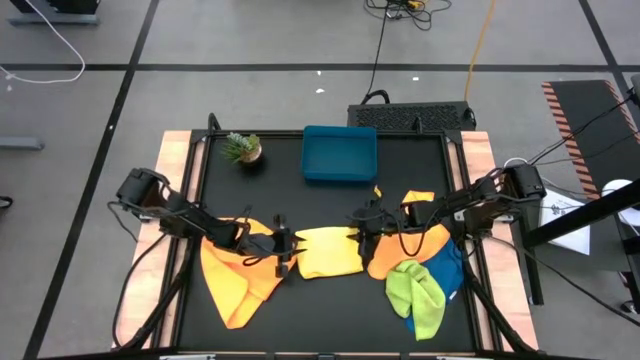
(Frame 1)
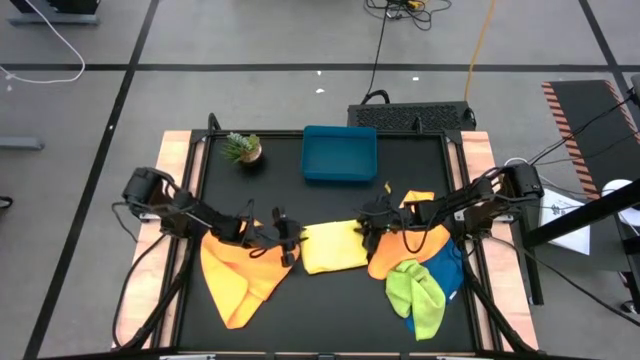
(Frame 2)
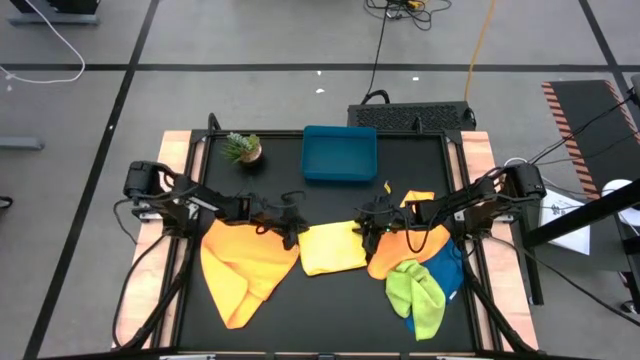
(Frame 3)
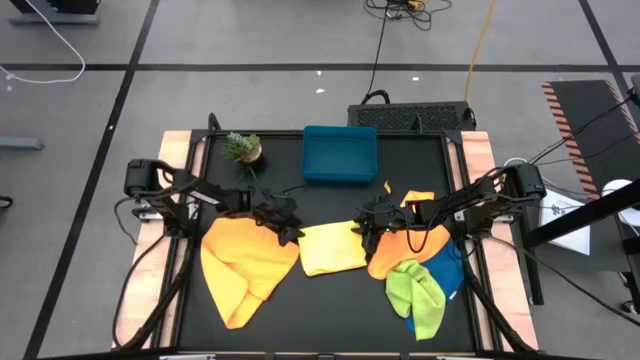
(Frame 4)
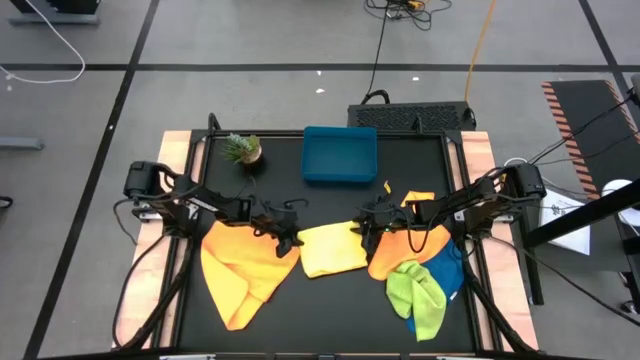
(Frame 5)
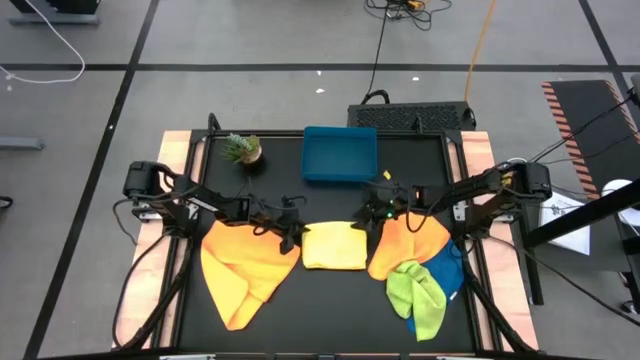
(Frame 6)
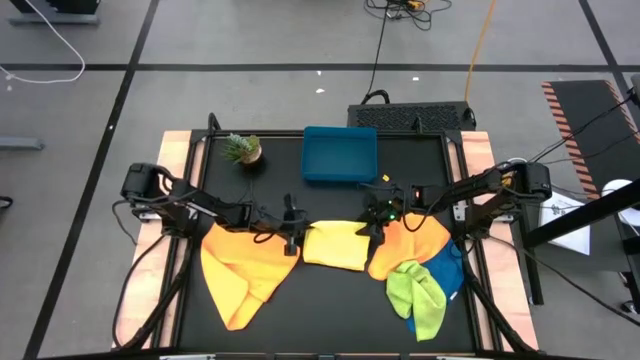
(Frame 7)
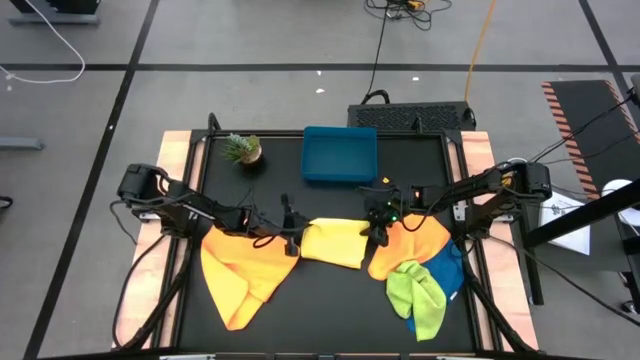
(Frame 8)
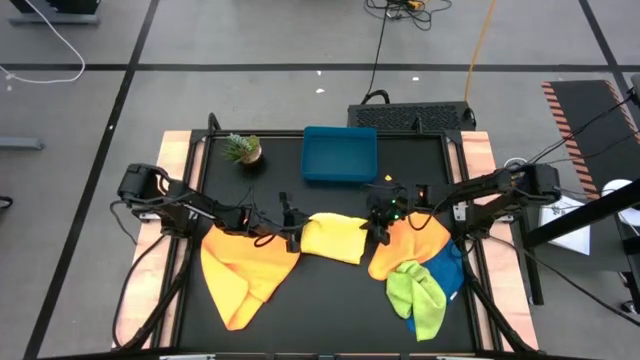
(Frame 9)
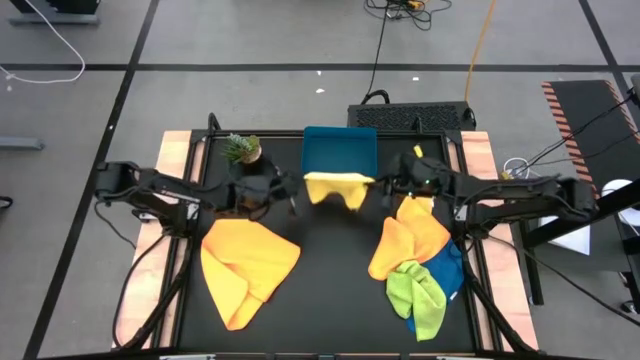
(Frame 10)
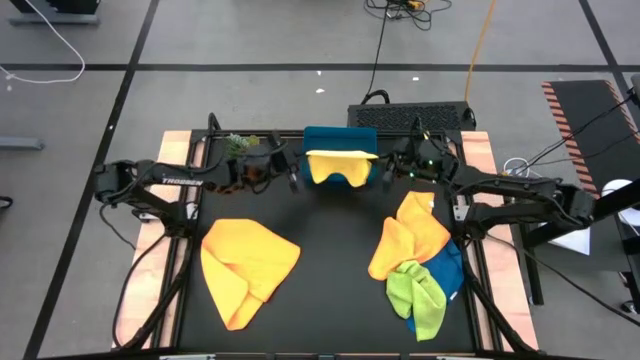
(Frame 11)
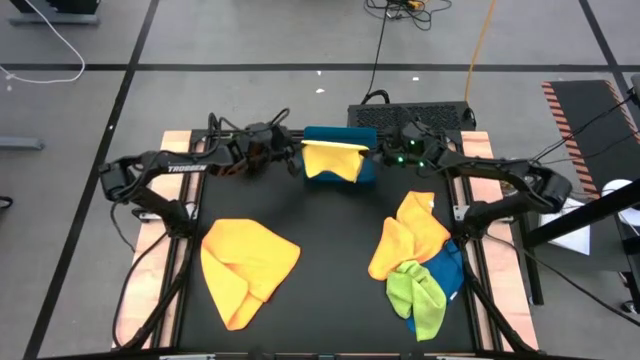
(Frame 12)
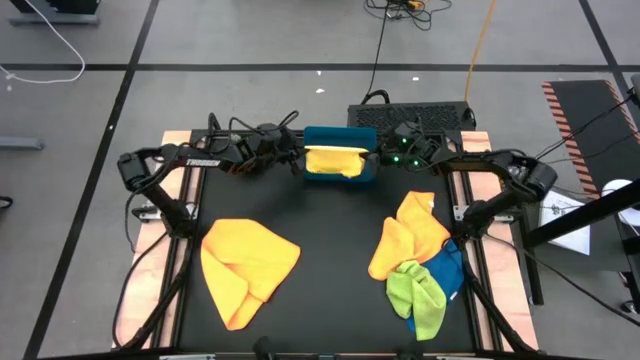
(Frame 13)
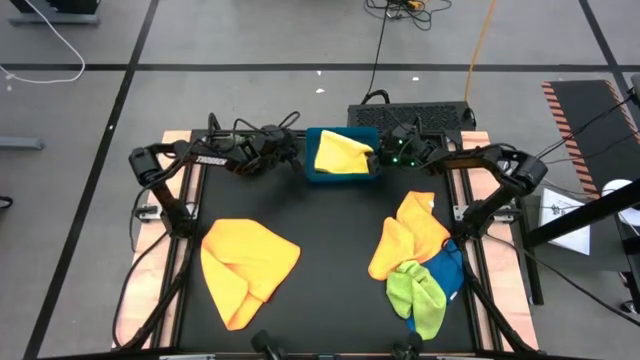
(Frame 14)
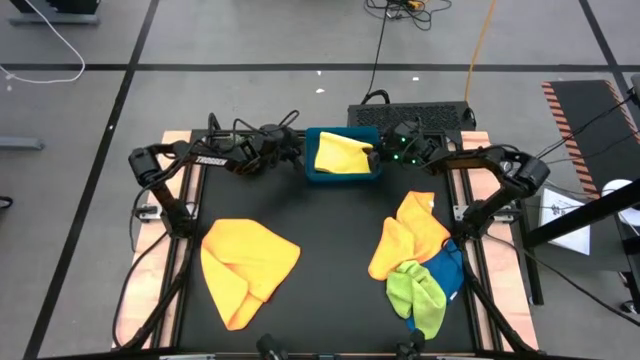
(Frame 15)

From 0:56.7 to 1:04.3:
Task: Fold microfiber towels
Put the yellow microfiber cloth into the blue bin

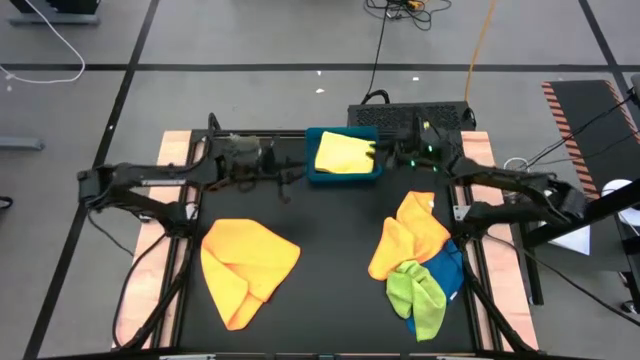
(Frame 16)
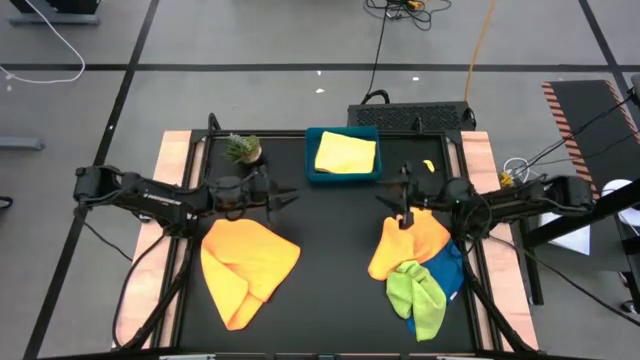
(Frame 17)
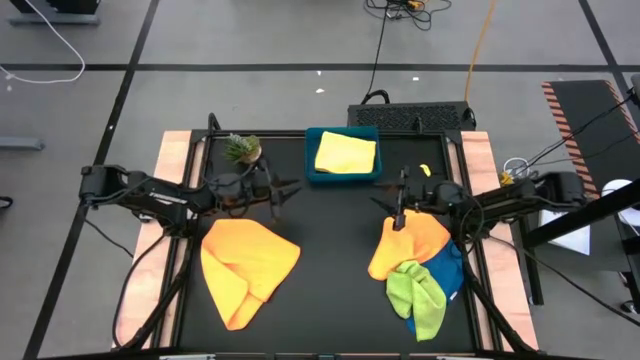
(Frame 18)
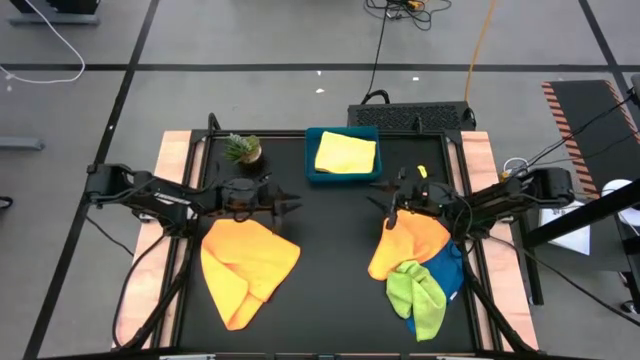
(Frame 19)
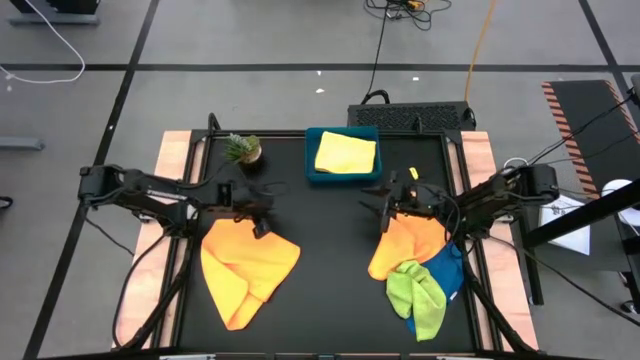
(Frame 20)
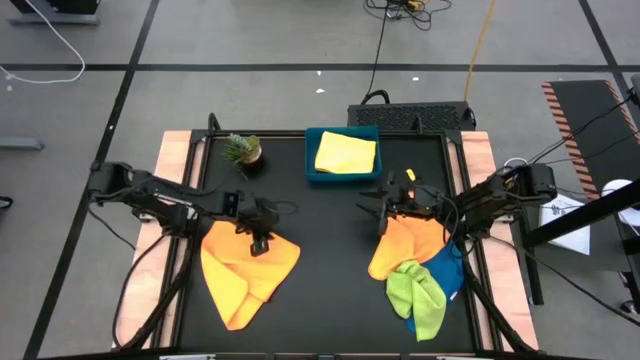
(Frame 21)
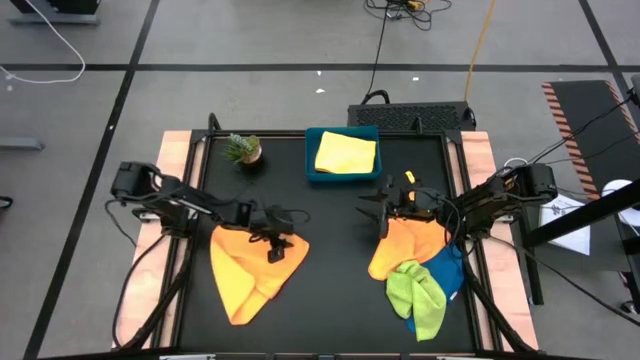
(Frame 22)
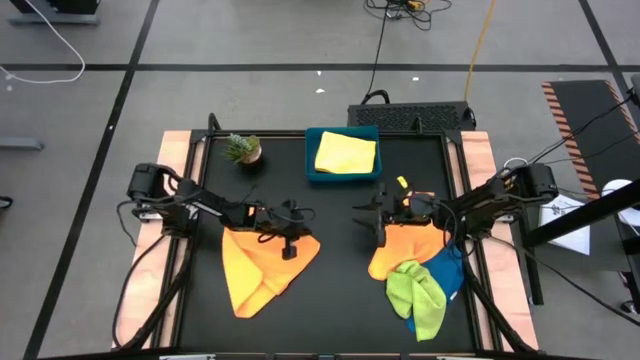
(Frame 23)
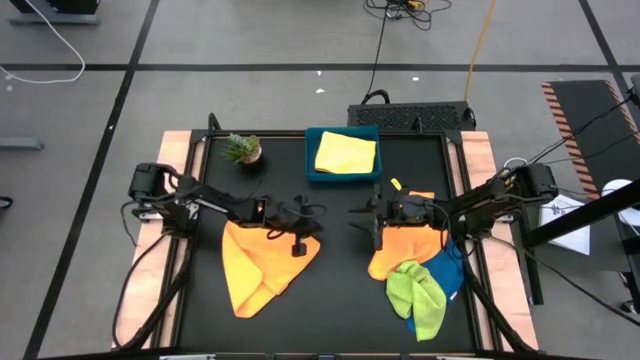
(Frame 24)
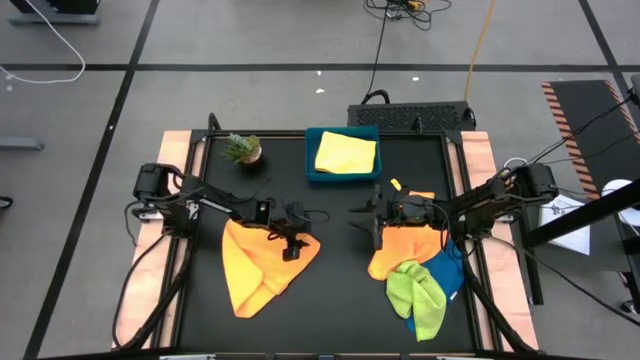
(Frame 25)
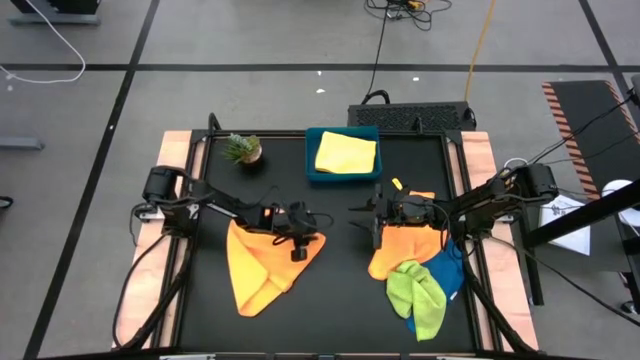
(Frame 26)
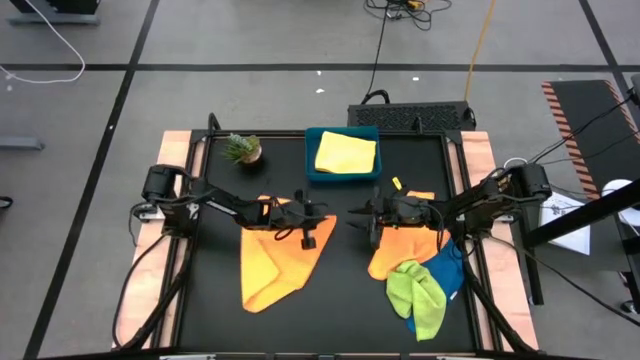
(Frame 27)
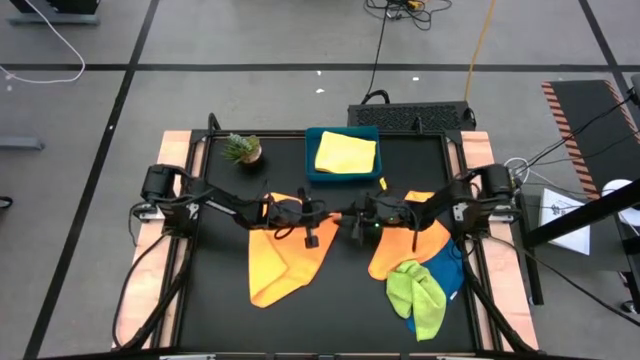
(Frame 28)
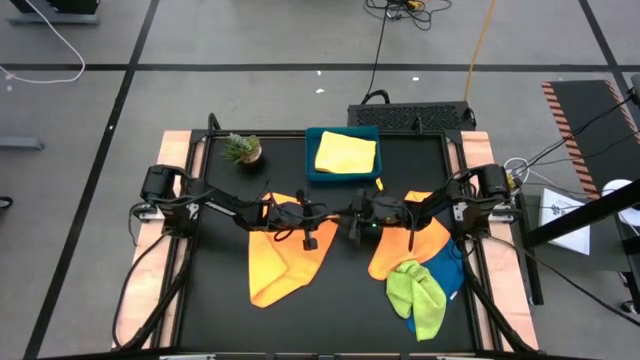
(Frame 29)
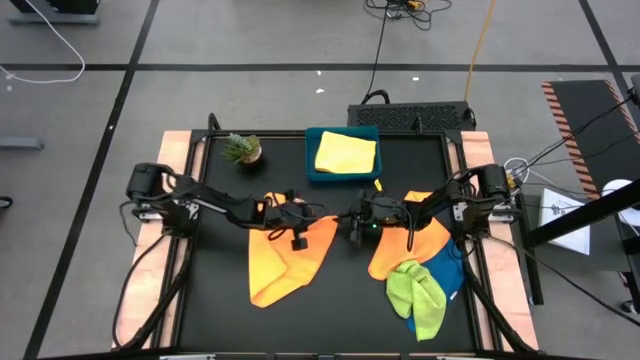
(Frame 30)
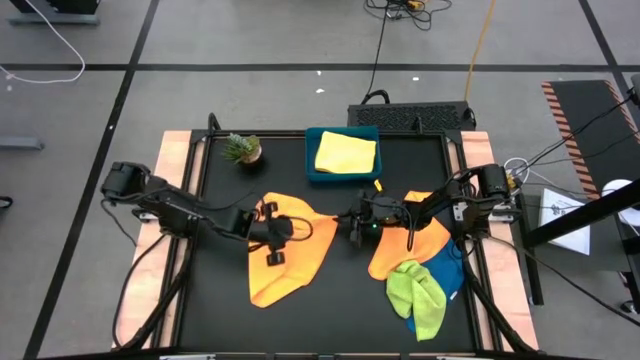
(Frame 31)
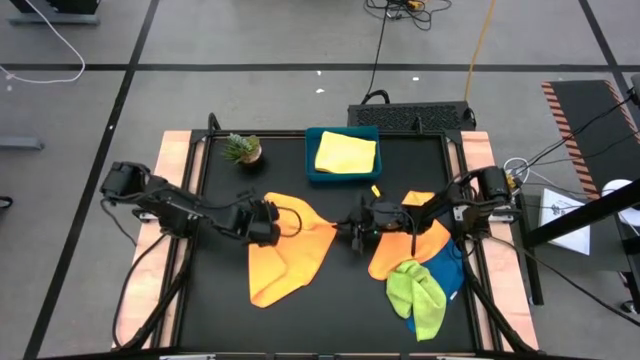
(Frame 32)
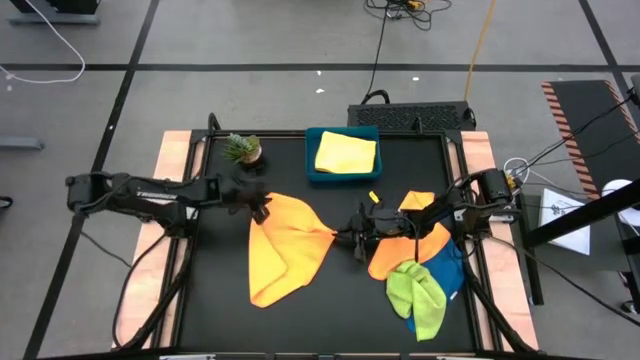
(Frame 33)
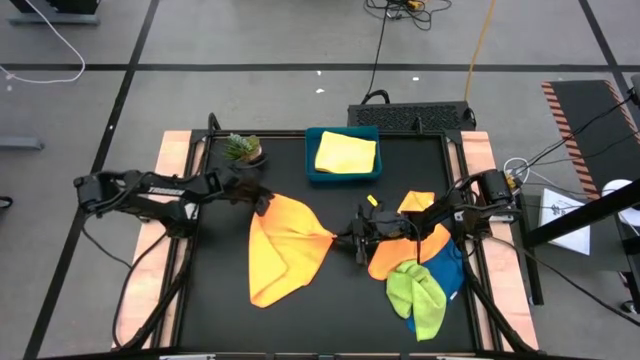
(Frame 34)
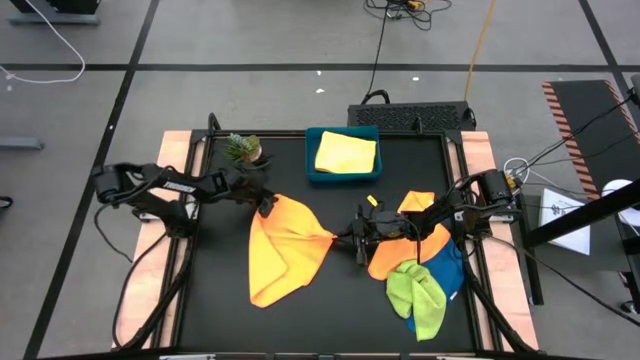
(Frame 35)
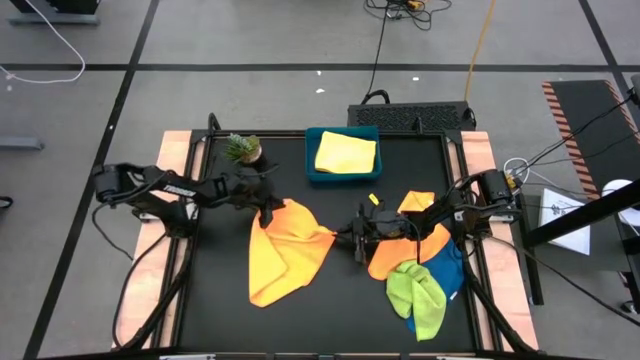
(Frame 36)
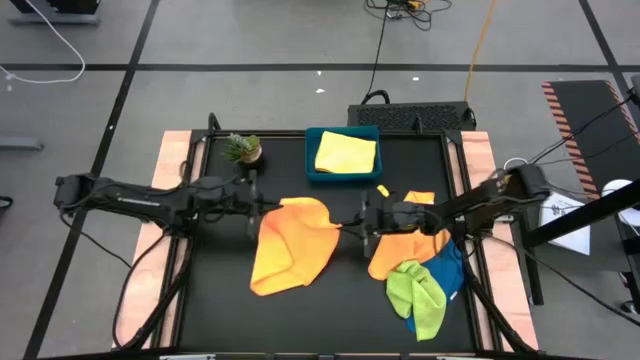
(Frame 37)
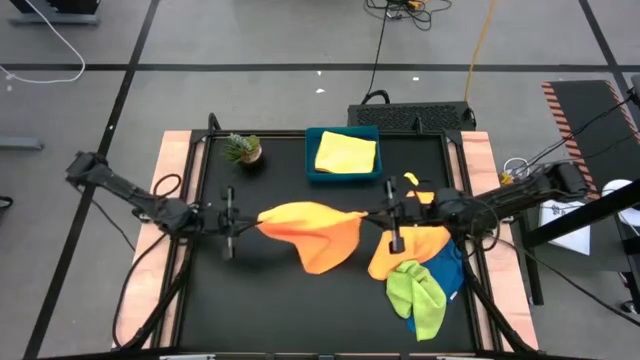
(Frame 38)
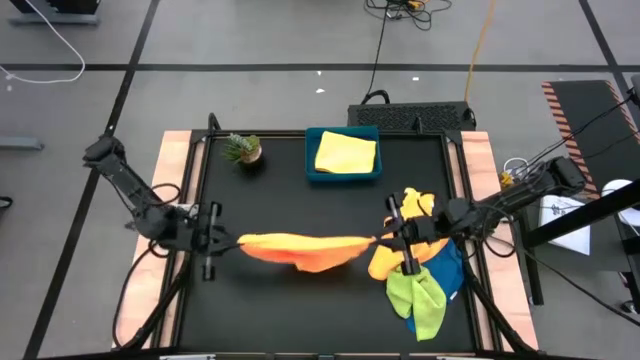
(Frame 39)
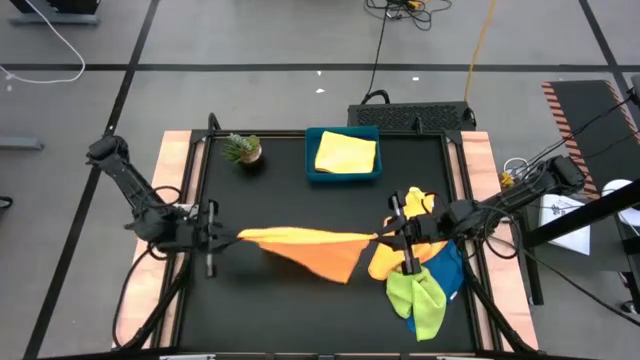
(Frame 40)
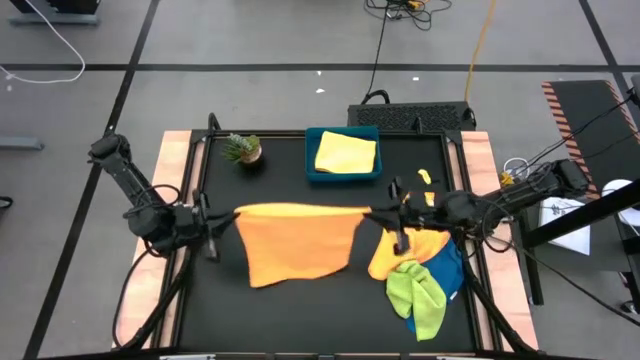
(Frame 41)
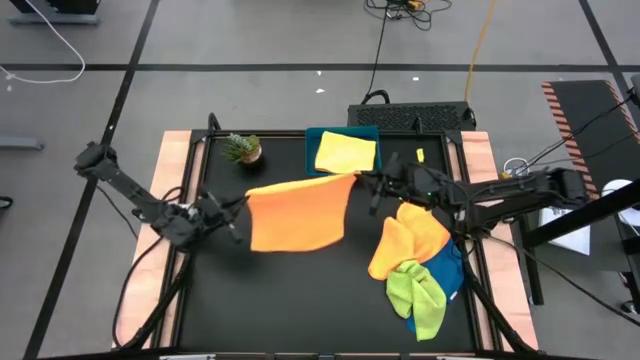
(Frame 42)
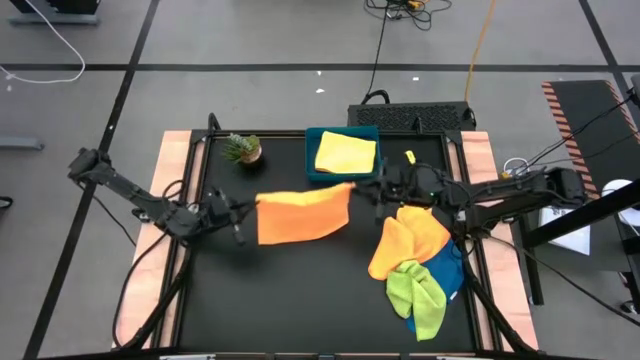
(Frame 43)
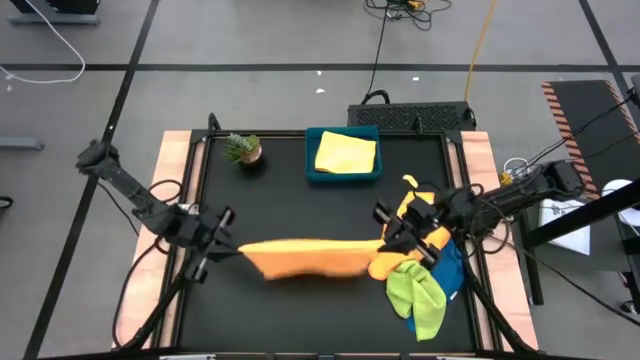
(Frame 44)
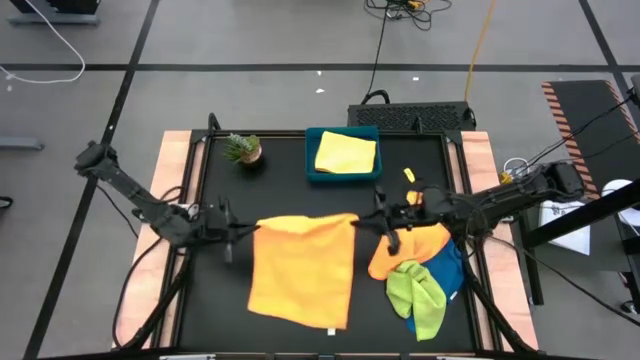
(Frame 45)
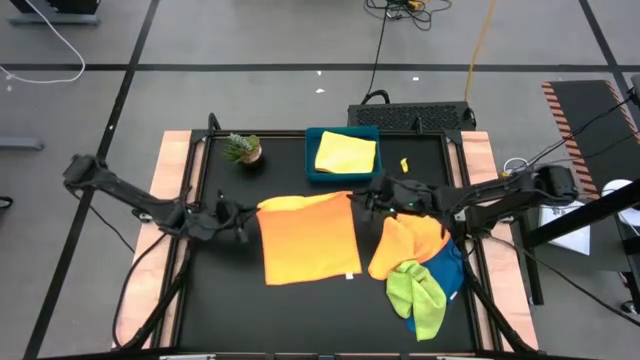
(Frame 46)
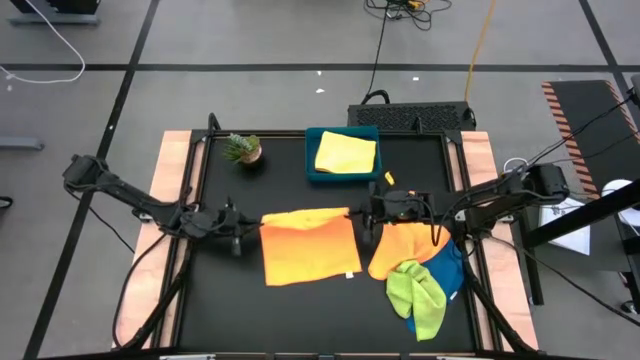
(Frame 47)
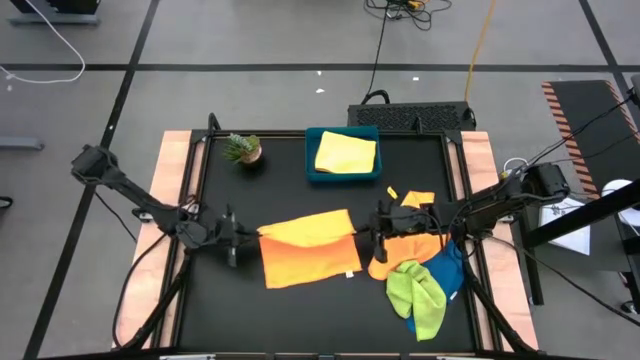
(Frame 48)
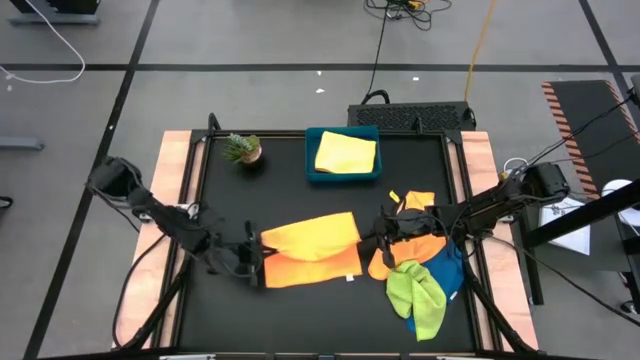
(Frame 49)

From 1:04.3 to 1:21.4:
Fold the left orange microfiber cloth
